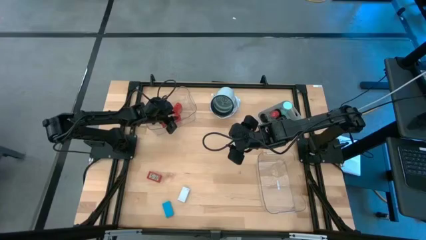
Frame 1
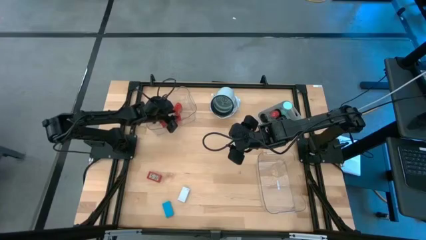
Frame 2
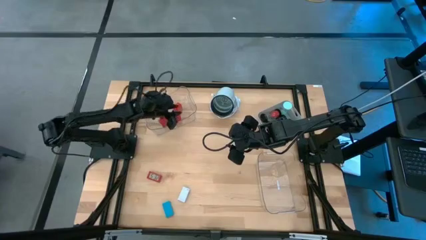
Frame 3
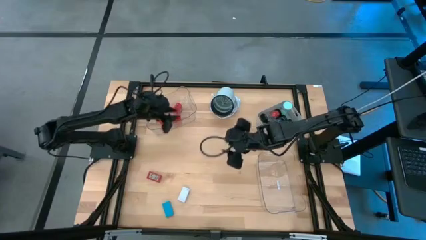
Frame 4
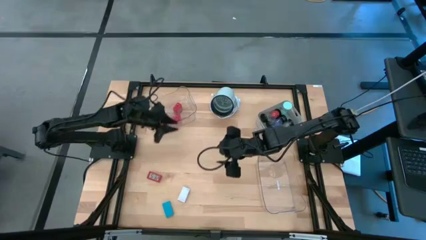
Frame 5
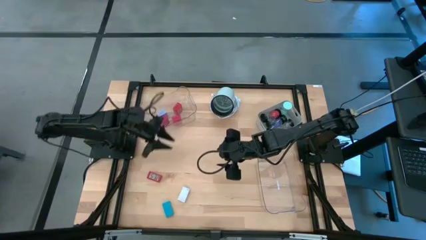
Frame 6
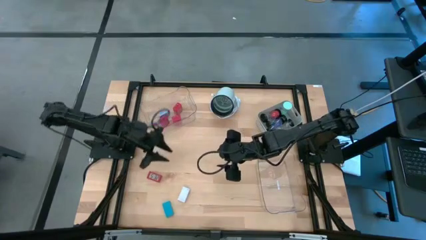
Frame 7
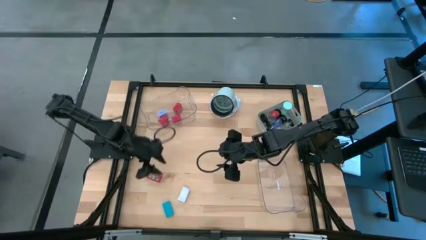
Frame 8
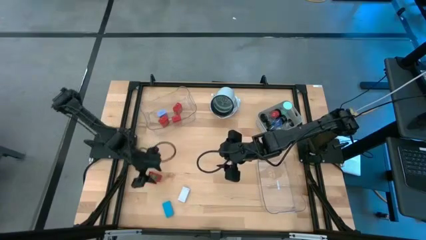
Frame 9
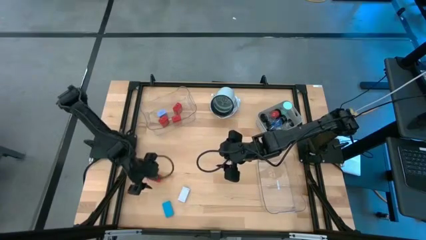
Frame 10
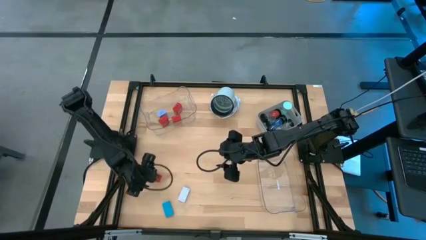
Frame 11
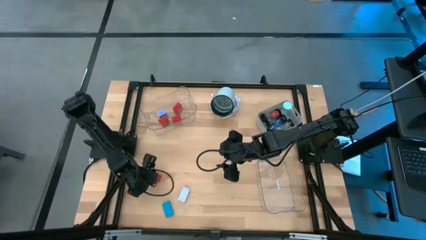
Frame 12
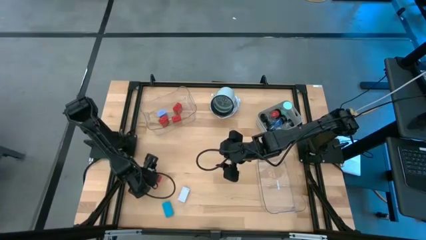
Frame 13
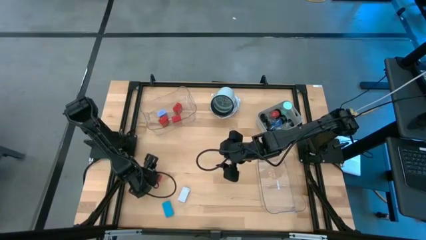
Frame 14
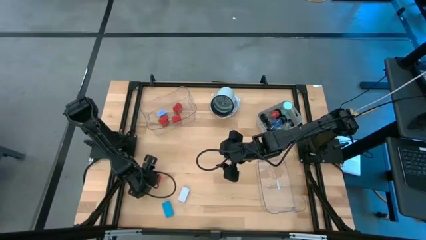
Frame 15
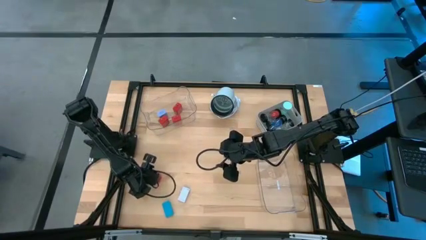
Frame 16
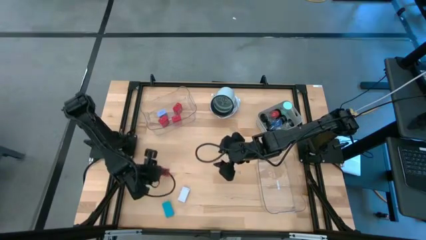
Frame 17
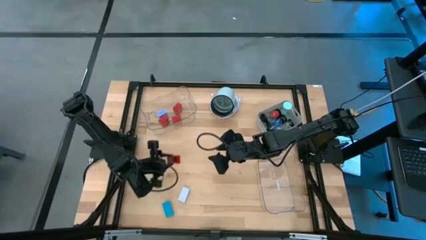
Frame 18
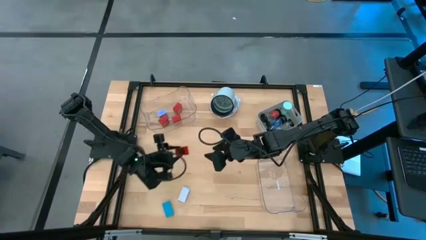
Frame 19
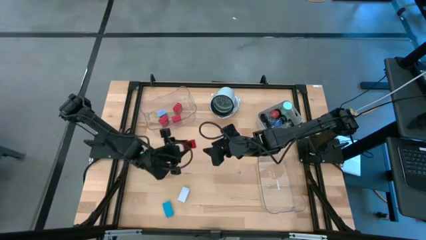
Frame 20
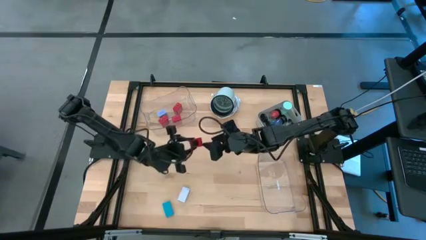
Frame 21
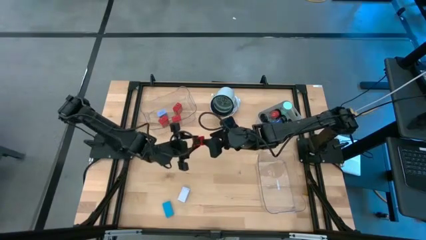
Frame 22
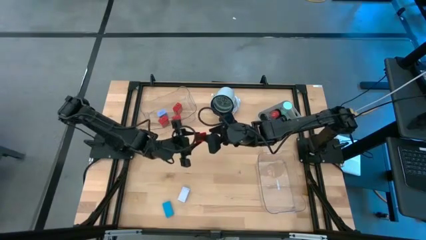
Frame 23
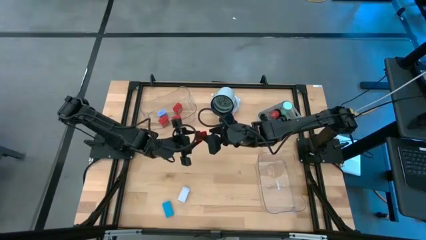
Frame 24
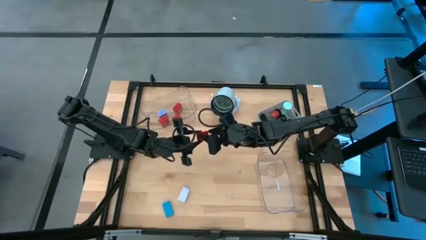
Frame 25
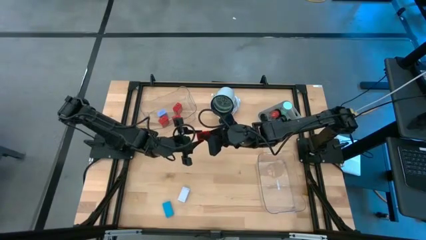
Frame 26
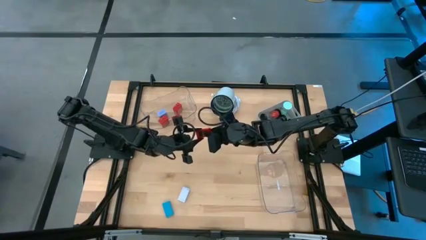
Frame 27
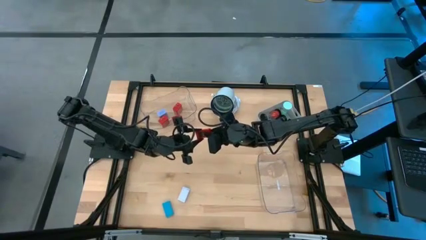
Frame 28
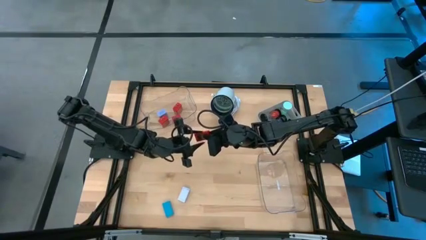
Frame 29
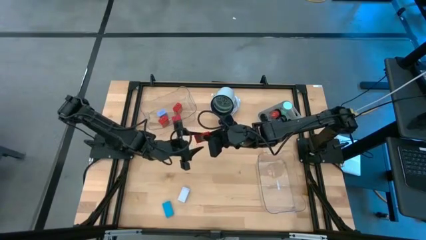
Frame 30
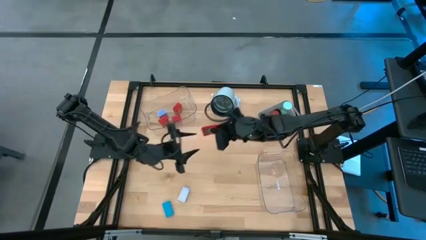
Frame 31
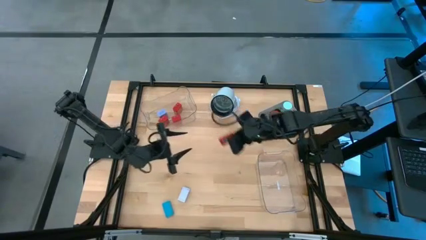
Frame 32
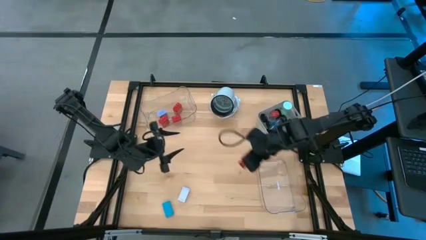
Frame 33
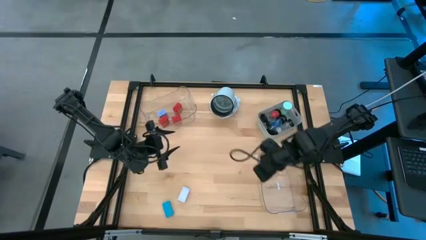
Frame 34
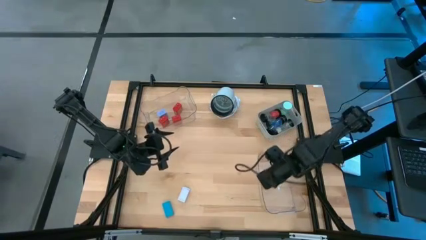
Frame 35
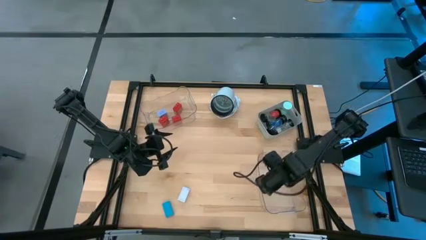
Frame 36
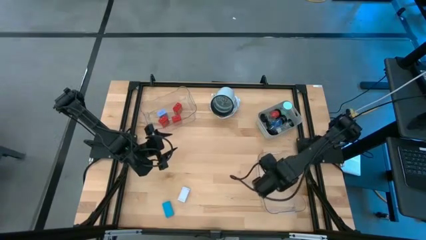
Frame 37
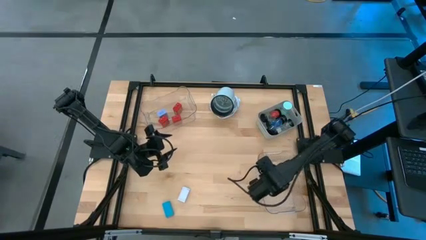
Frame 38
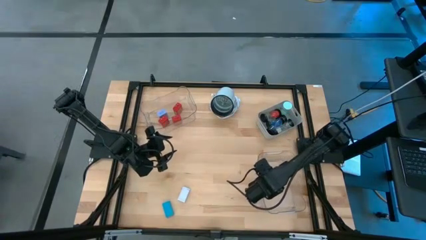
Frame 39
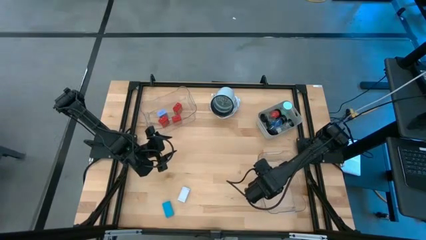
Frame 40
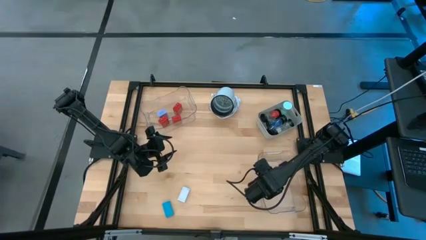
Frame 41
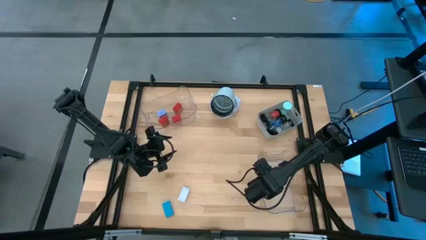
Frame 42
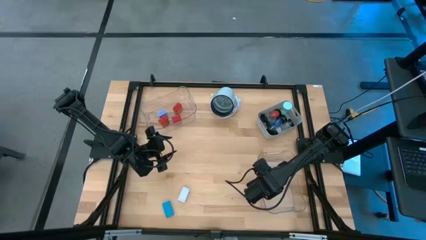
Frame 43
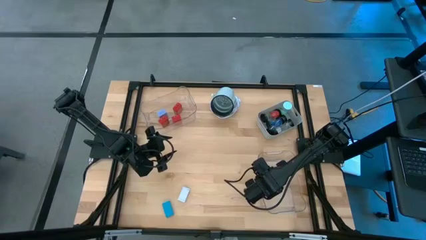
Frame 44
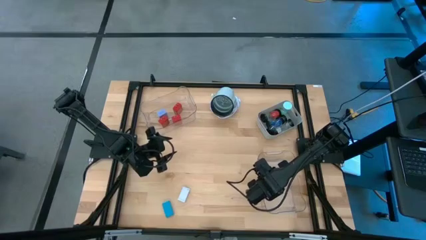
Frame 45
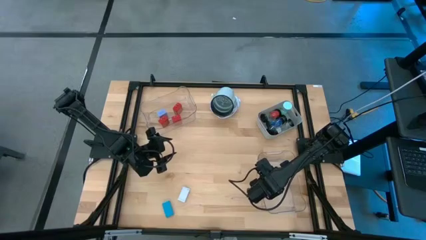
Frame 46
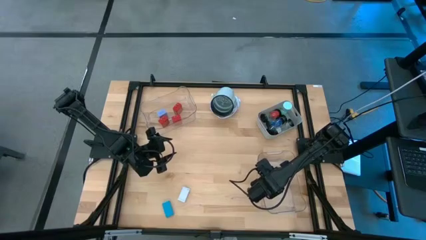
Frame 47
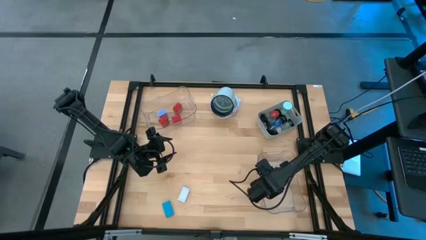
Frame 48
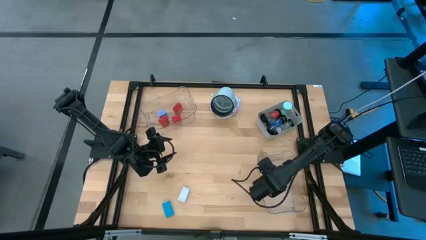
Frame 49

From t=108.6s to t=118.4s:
Task: Pick & Place Office items
Put the red digital clock into the right transparent bin

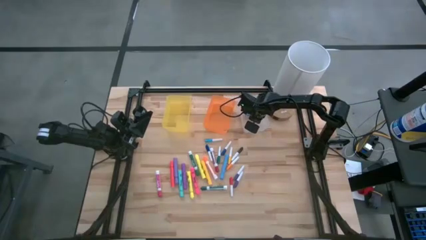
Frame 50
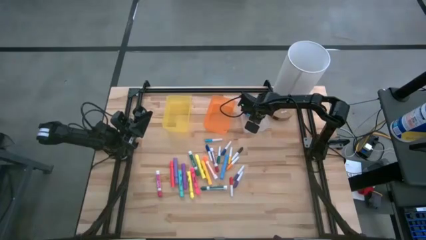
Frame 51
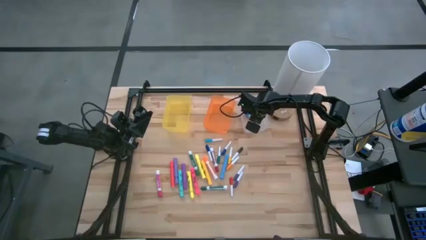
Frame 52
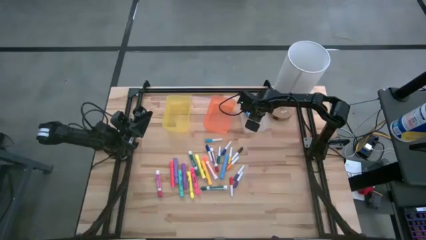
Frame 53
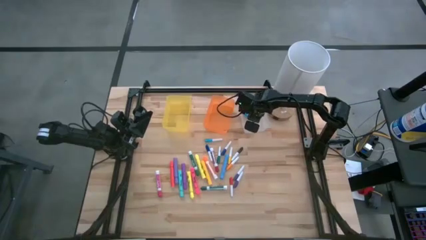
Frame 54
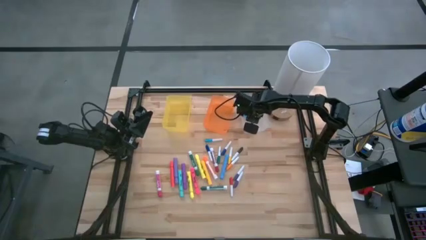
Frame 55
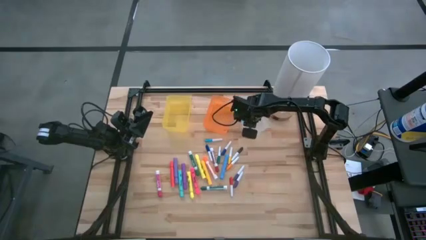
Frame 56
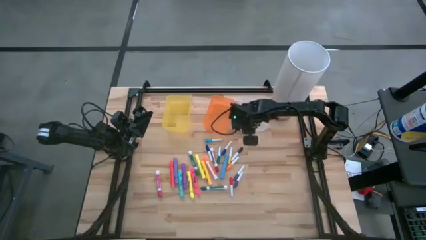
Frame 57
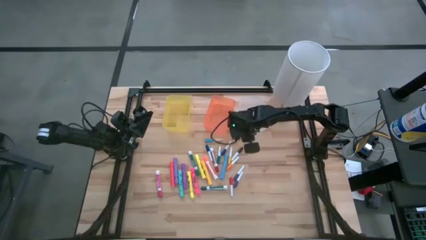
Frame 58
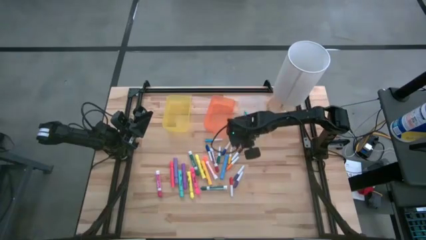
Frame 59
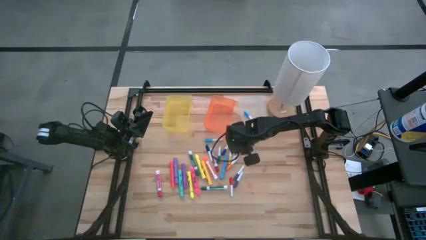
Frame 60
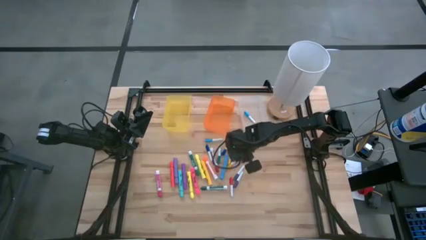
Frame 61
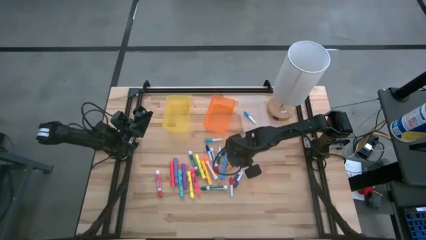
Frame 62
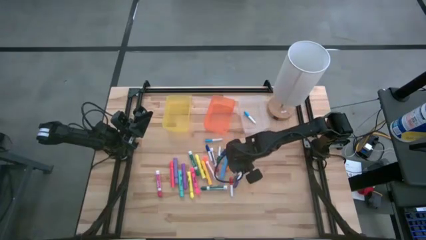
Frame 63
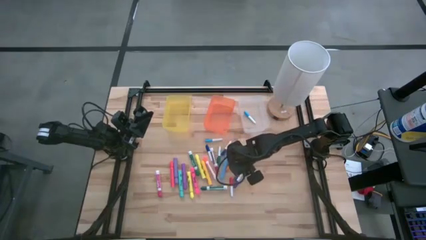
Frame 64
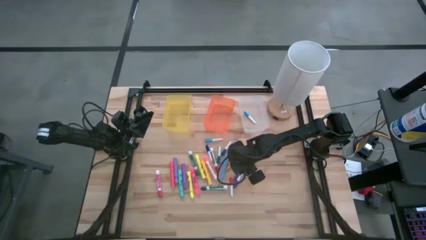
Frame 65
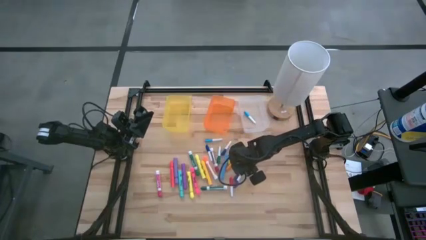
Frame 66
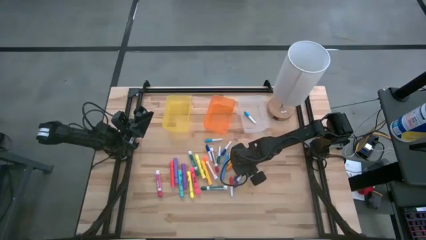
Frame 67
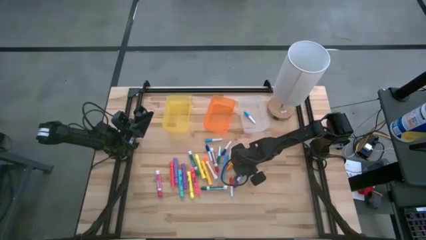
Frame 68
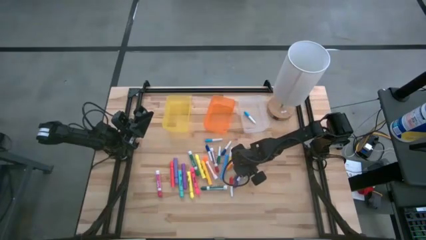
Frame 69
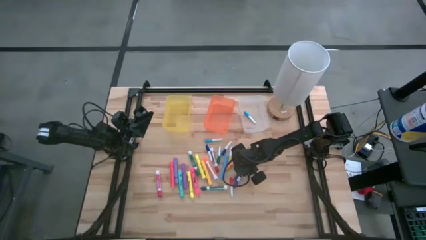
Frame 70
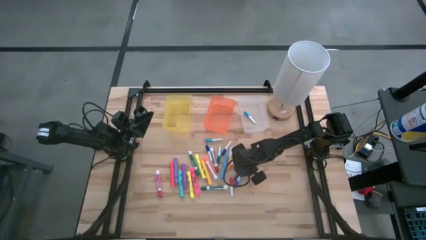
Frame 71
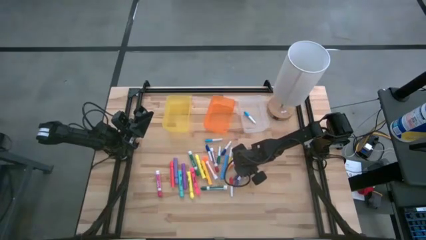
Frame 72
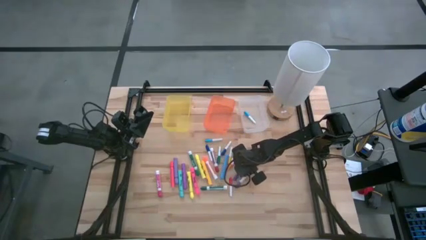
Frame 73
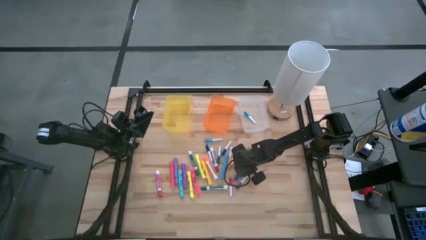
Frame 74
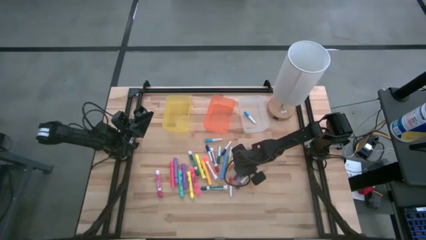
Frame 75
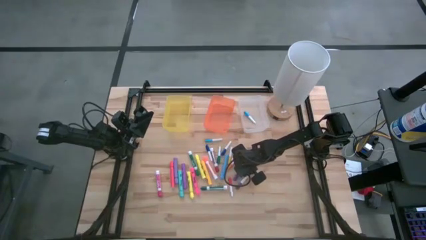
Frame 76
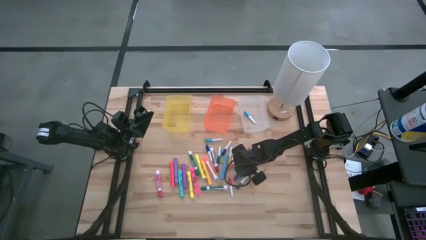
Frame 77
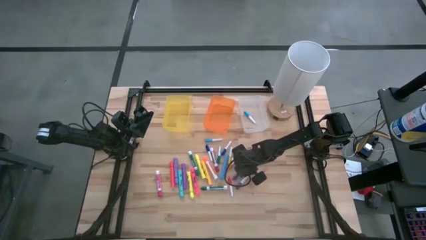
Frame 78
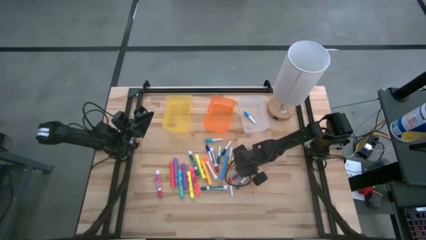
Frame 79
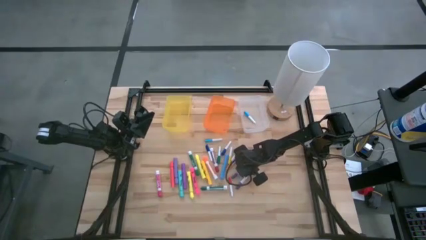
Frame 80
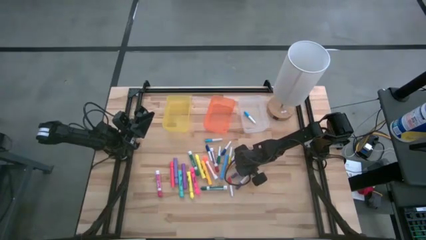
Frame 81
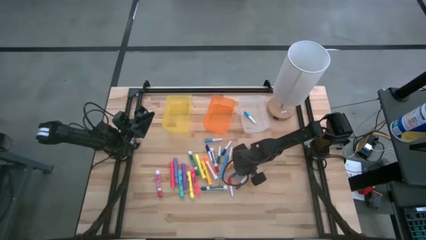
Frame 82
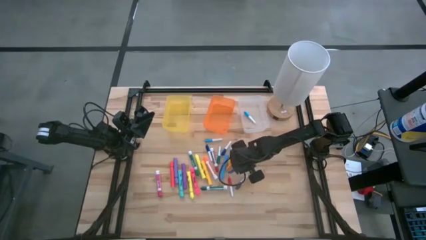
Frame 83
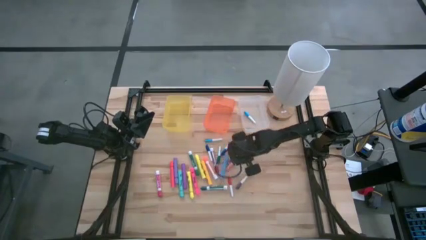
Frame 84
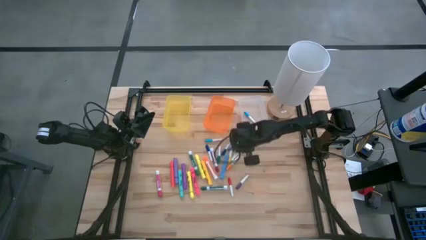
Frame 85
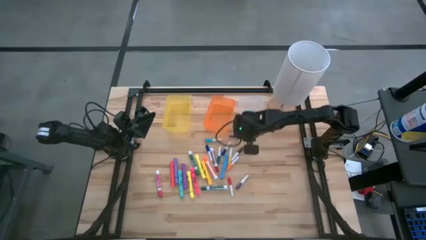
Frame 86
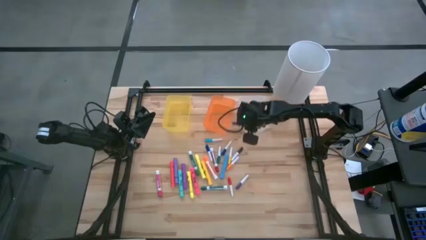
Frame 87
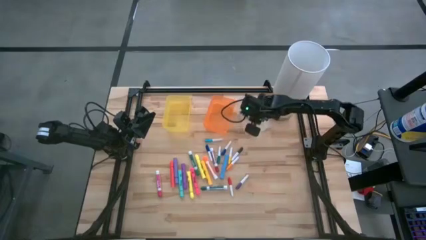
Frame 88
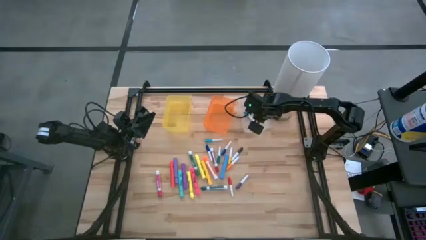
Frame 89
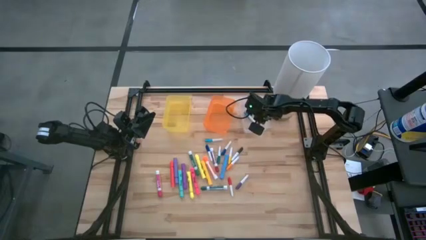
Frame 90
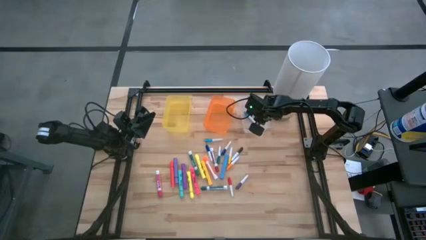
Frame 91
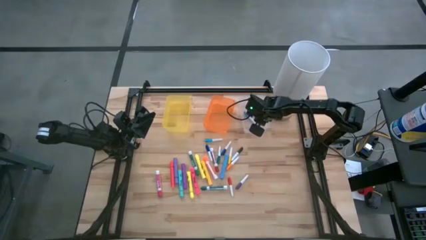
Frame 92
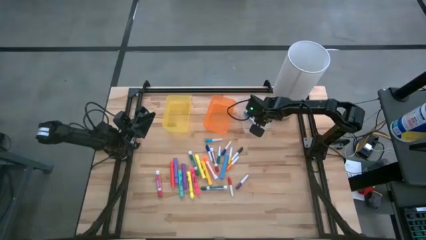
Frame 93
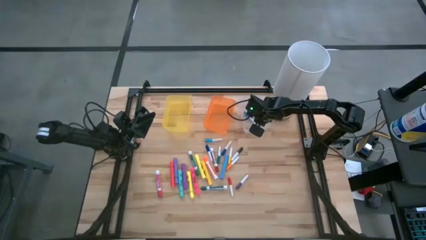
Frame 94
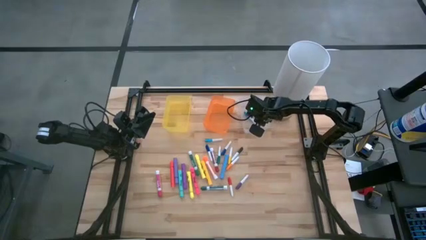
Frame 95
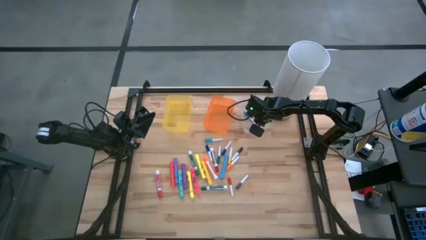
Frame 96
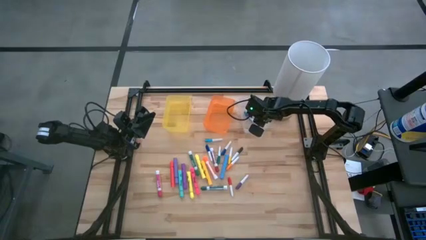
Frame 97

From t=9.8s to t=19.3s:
Task: Pick & Place Markers
Put the top purple mini marker into the white bin
